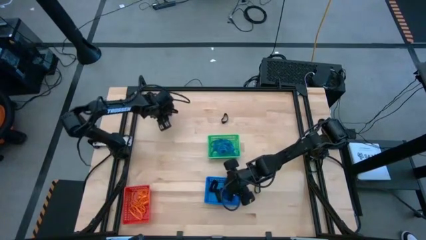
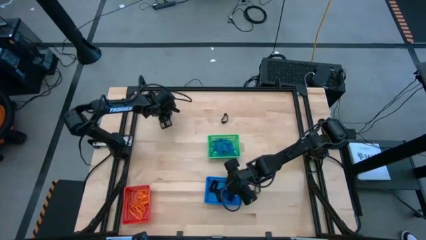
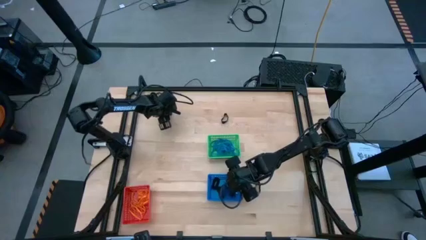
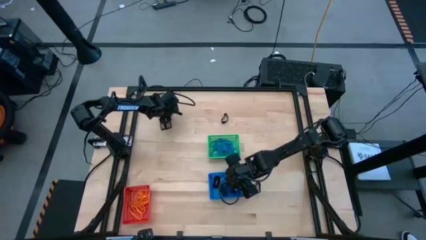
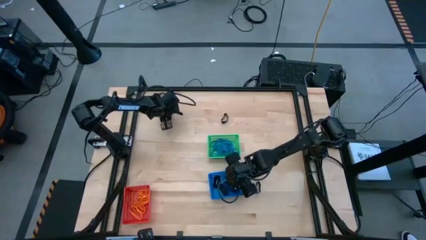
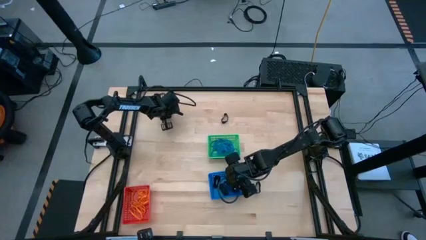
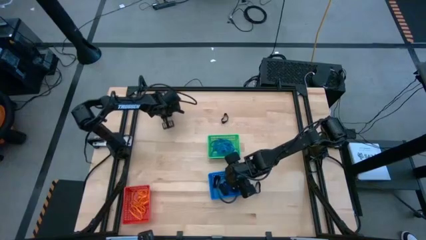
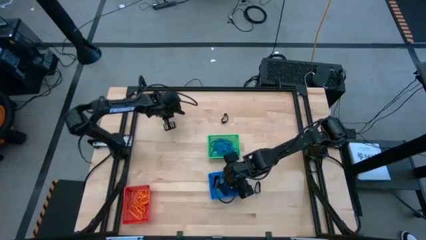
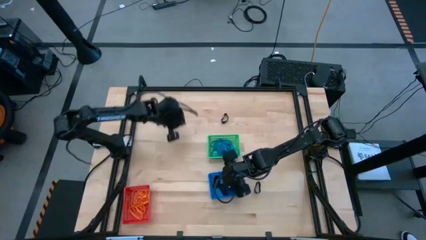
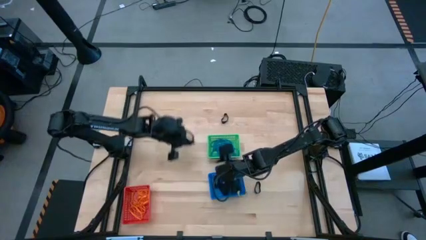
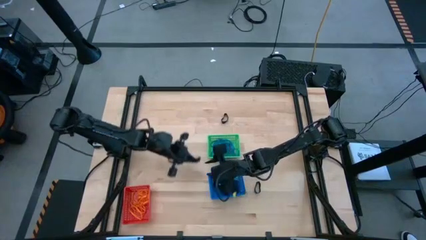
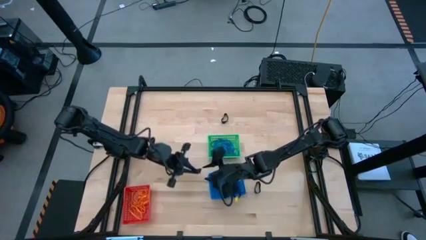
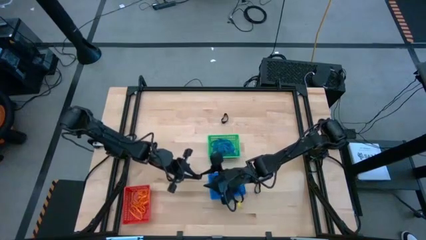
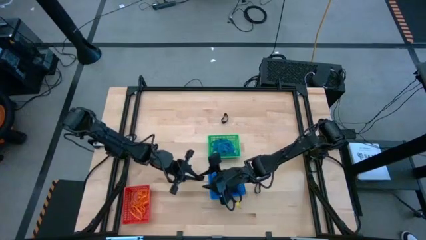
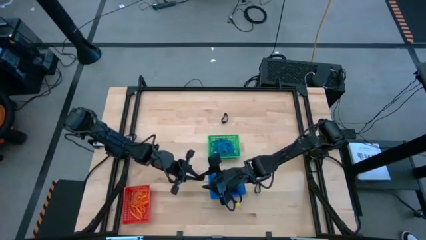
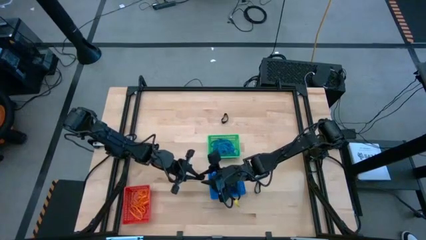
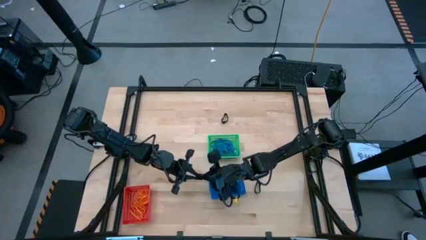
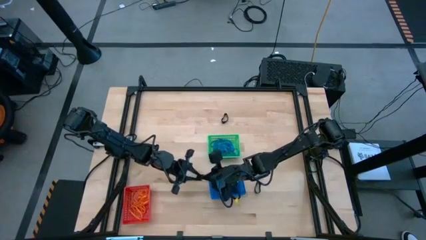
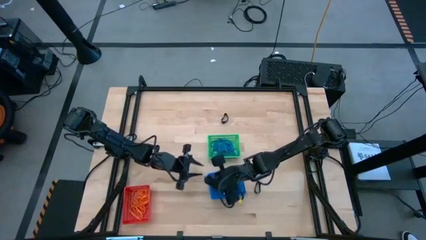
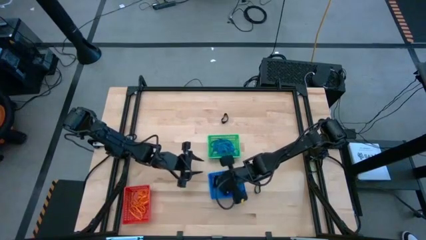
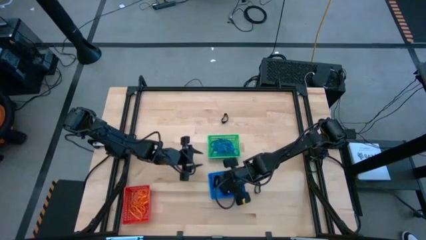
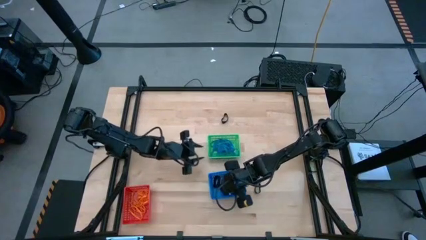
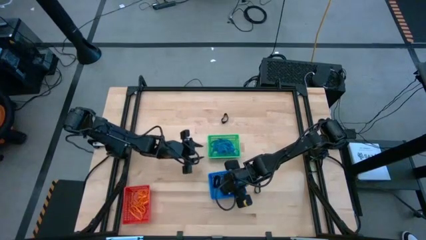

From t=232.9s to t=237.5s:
Task: Sort rubber bands into baskets
Put the black rubberband into the blue bin

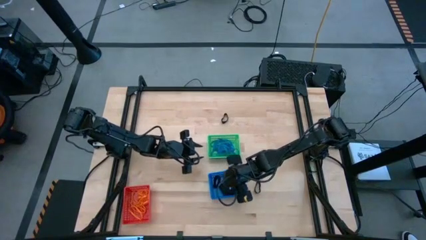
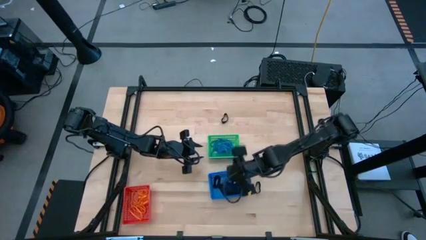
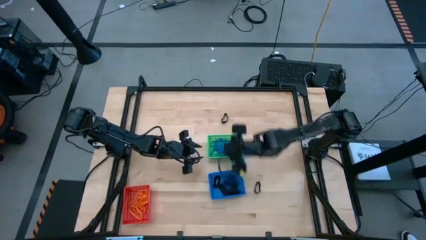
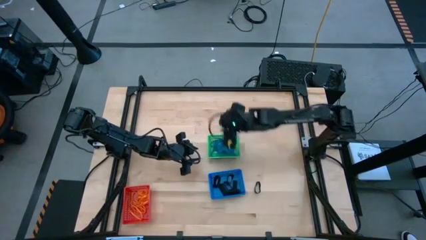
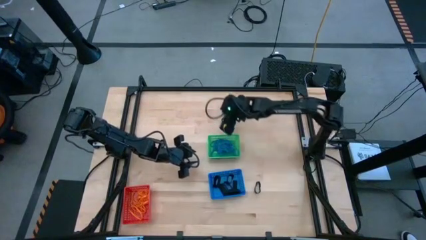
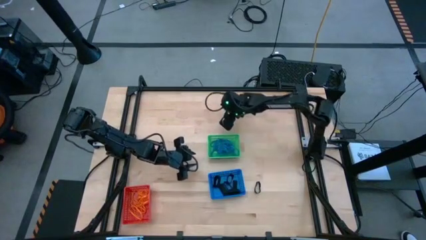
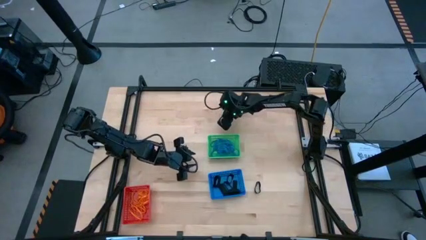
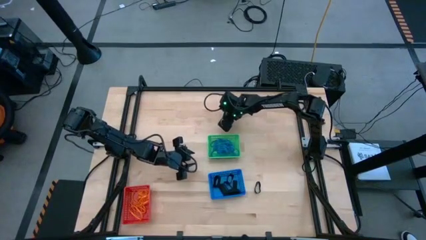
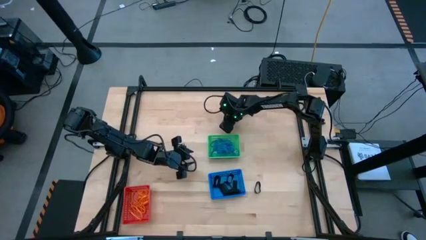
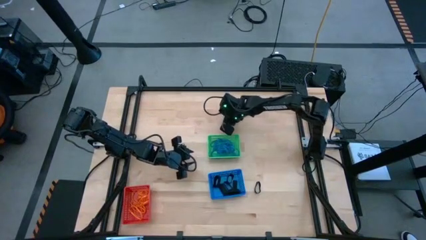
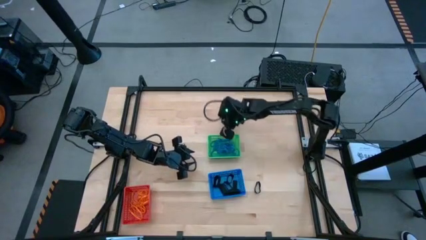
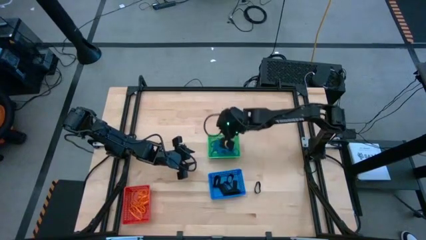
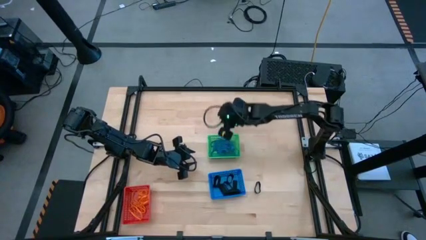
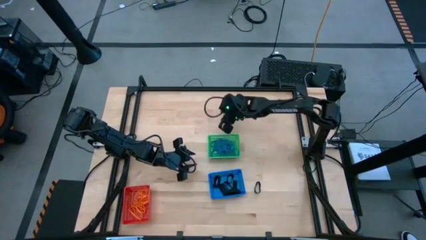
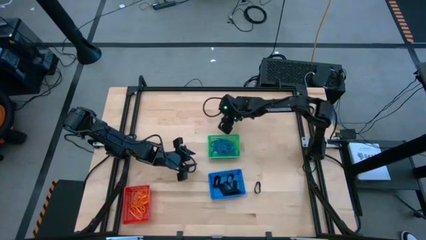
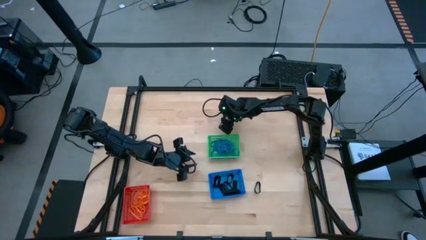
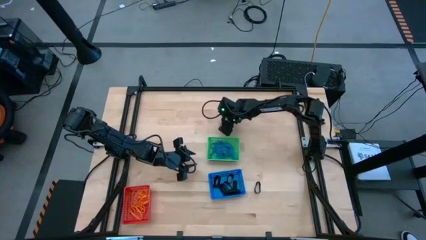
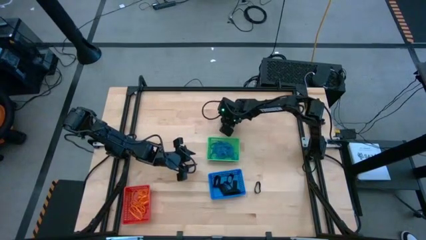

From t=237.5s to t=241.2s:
Put the black rubberband into the blue bin

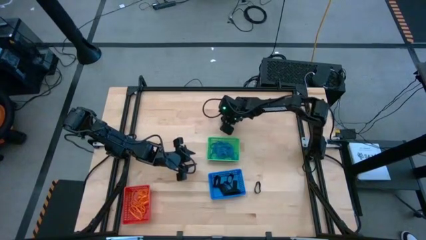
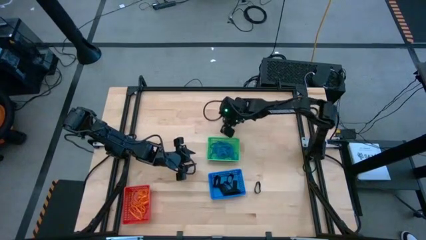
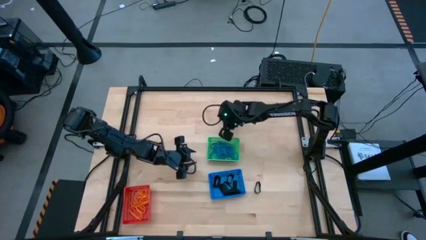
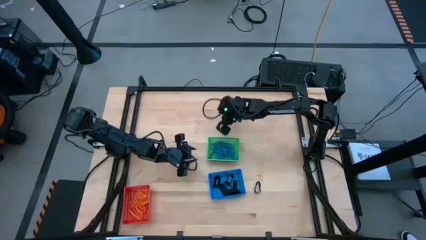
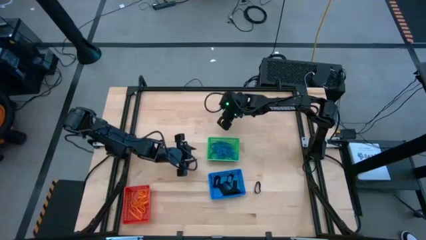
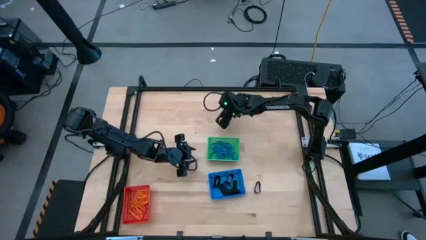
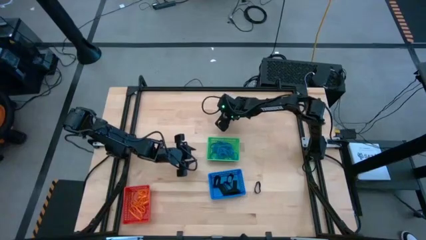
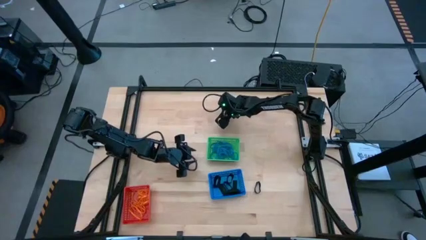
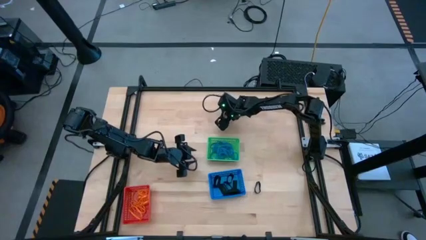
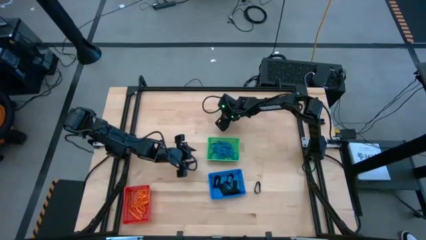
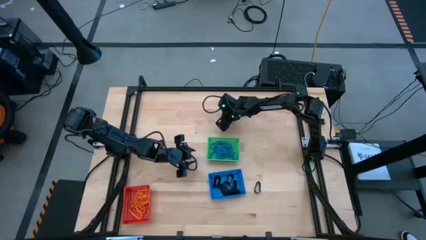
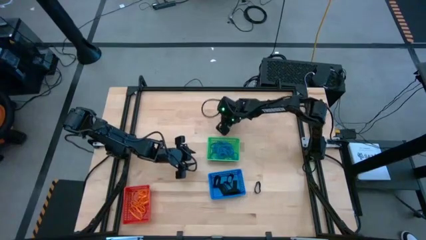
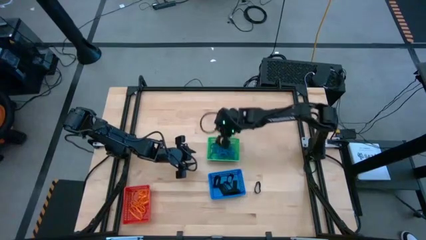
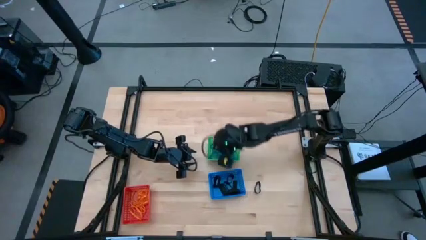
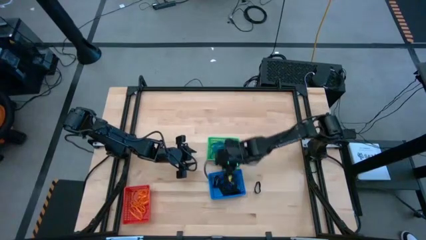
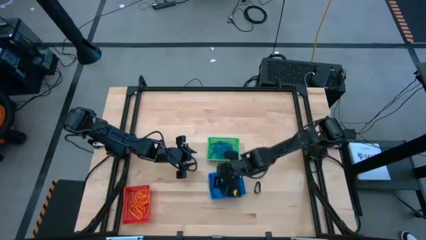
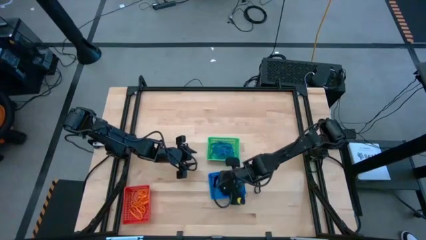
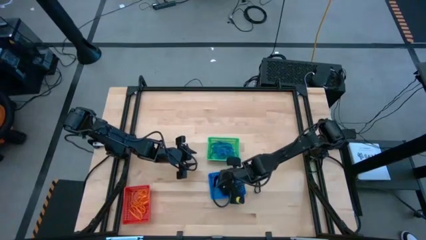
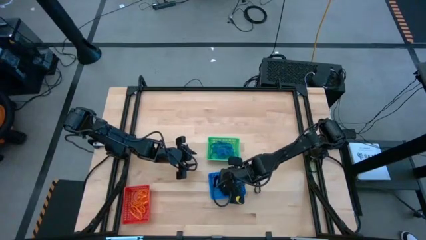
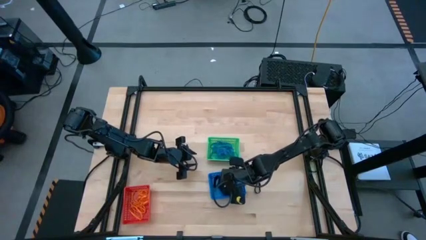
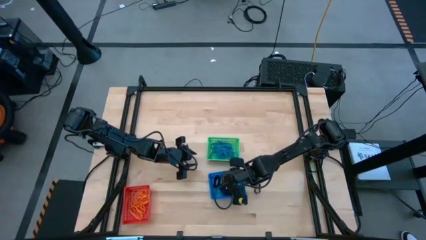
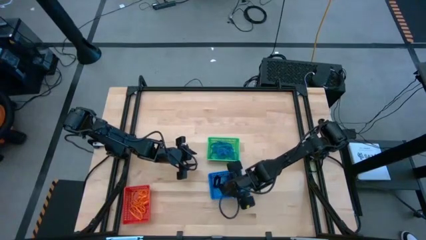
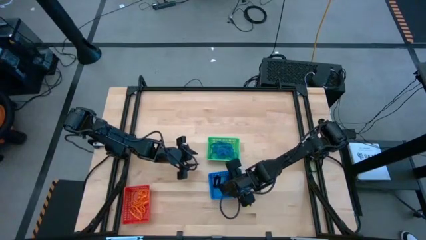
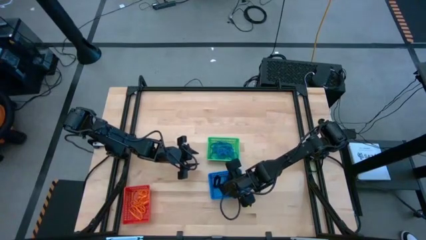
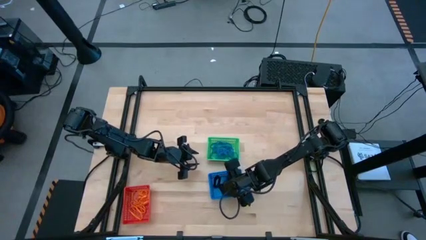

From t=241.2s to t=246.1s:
Put the black rubberband into the blue bin

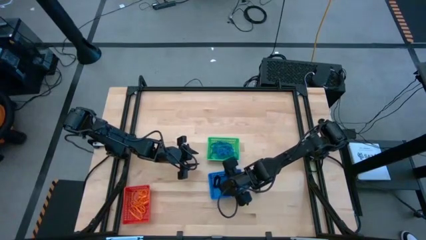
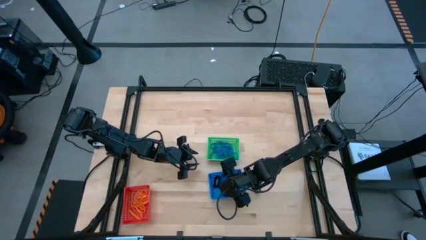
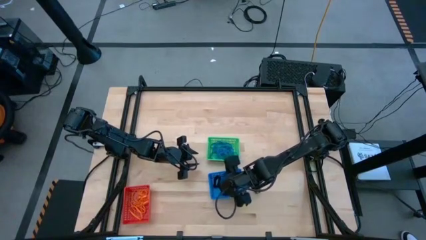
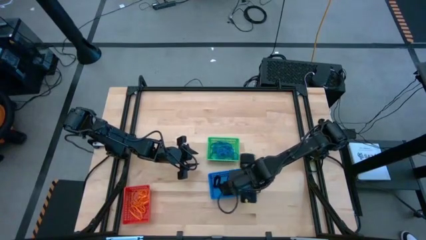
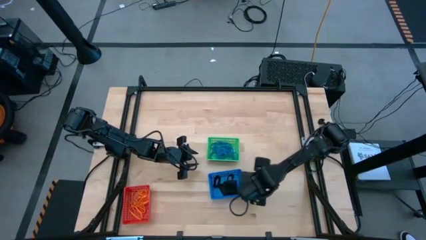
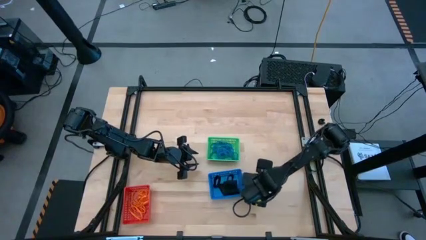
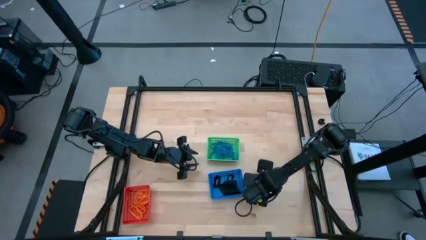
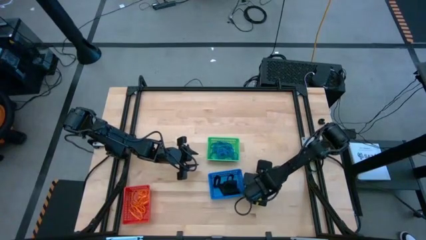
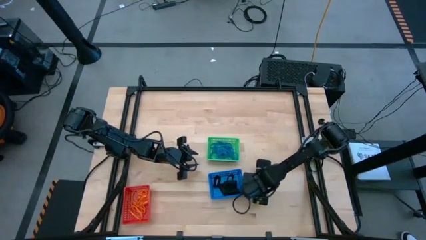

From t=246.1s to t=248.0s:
Put the black rubberband into the blue bin

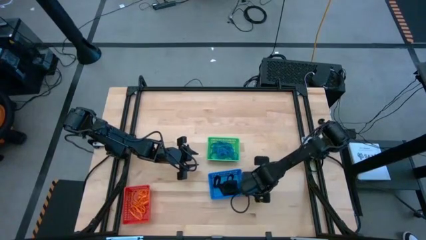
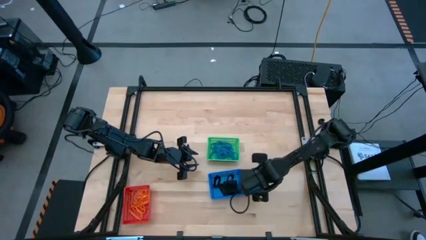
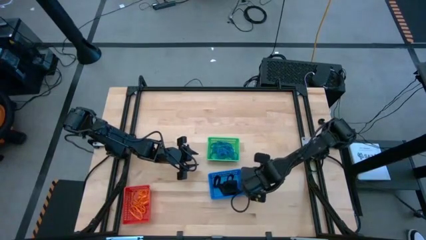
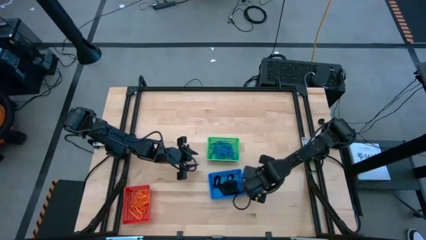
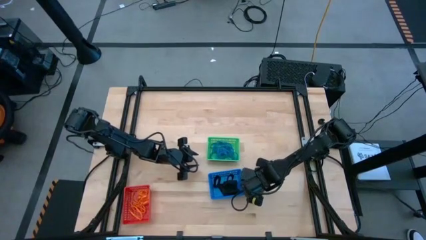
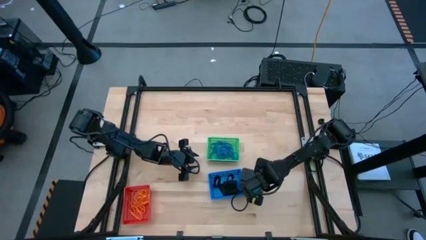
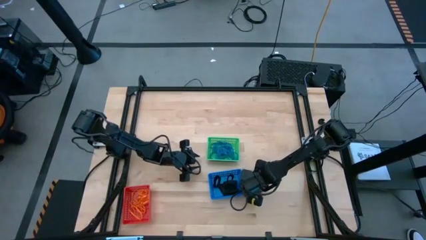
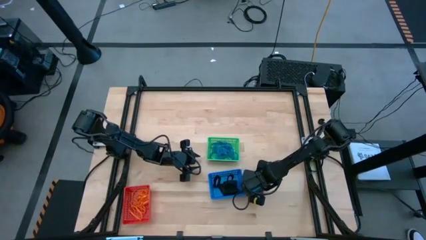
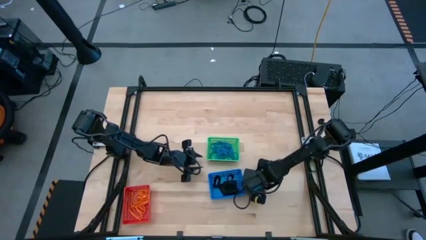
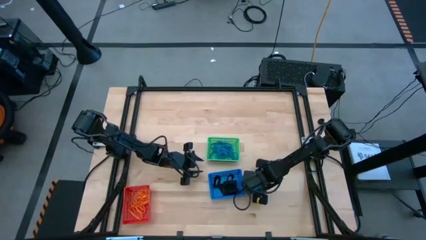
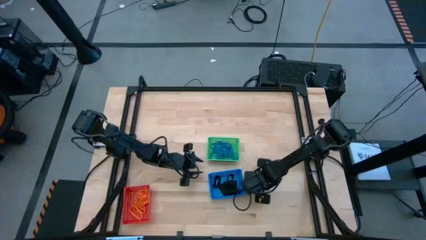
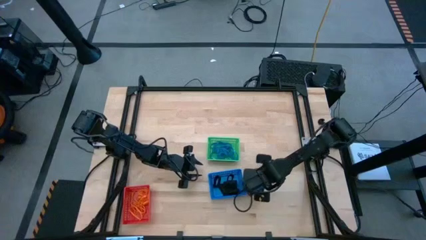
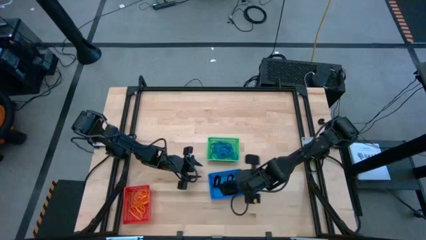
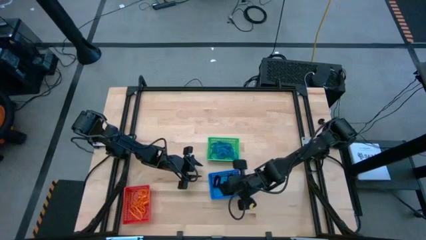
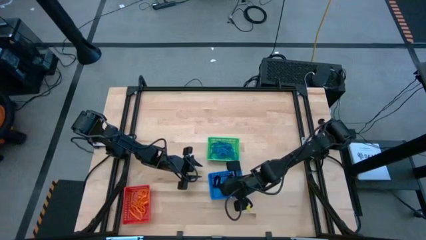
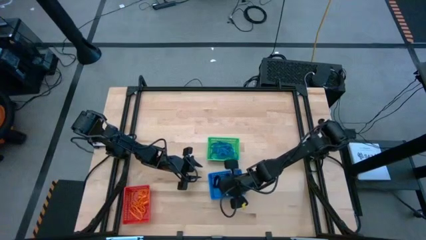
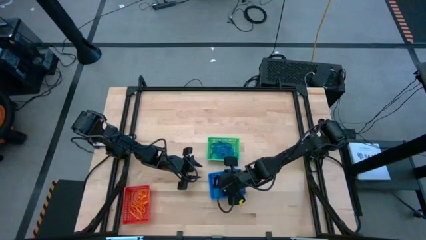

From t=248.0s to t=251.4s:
Put the black rubberband into the blue bin
